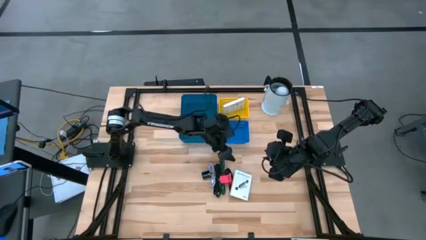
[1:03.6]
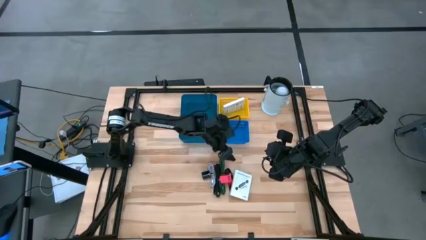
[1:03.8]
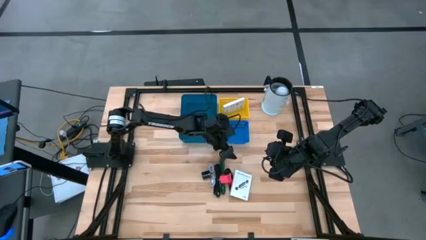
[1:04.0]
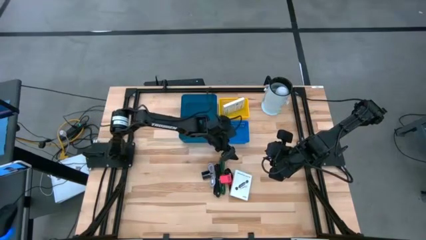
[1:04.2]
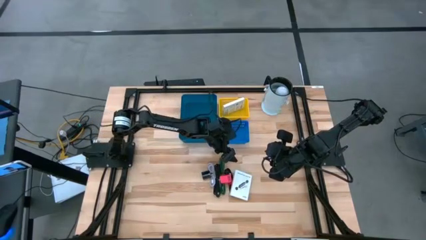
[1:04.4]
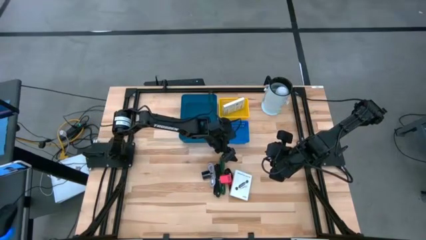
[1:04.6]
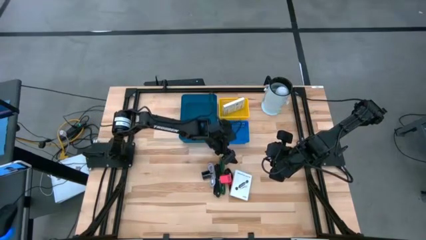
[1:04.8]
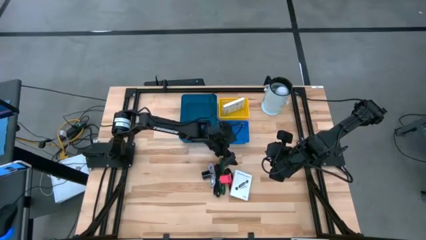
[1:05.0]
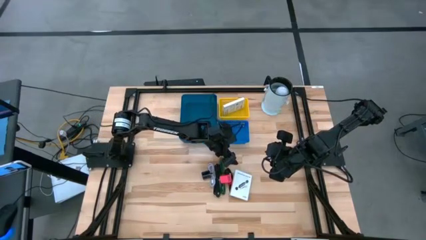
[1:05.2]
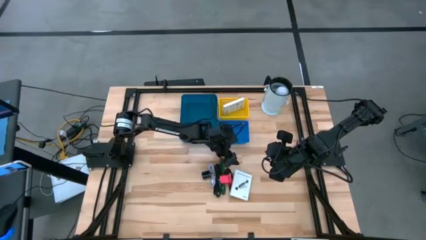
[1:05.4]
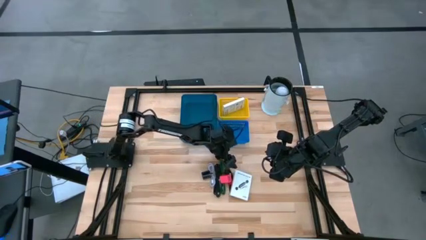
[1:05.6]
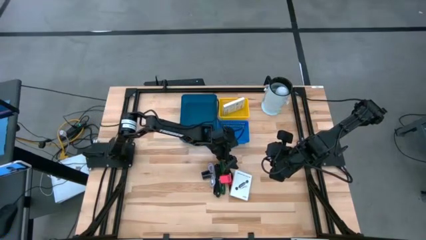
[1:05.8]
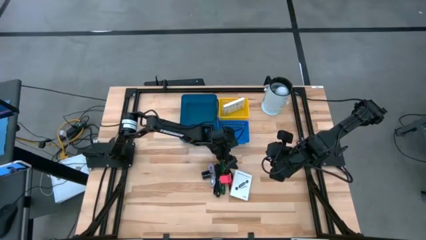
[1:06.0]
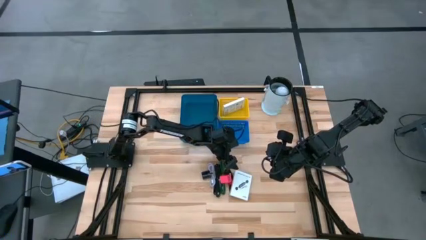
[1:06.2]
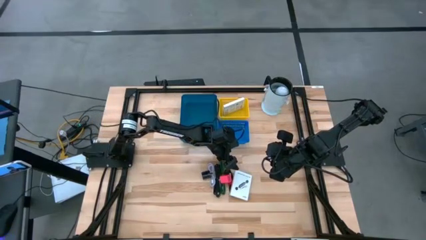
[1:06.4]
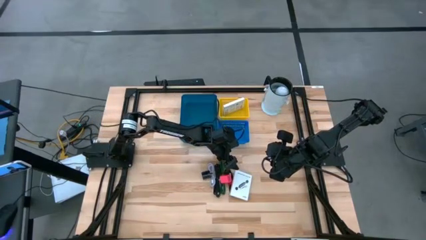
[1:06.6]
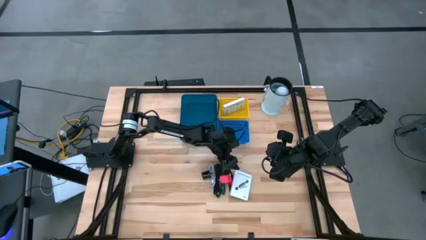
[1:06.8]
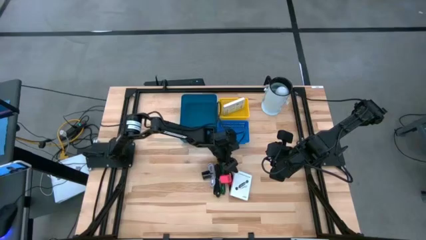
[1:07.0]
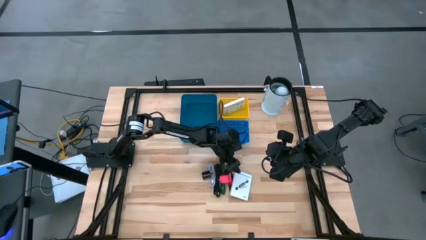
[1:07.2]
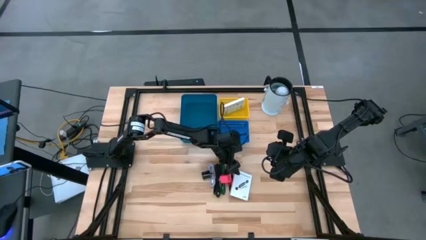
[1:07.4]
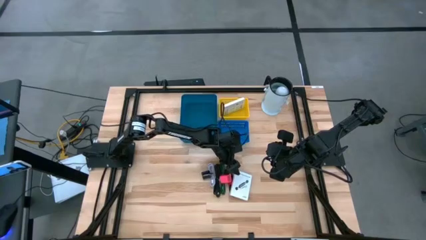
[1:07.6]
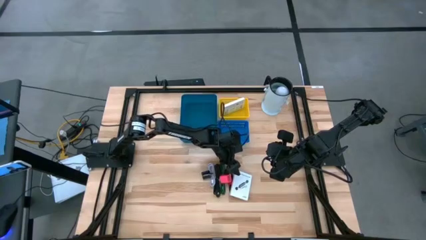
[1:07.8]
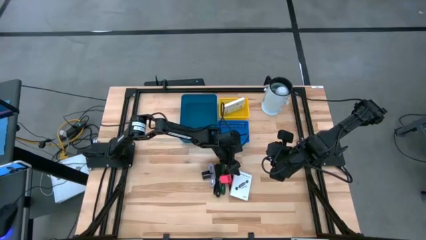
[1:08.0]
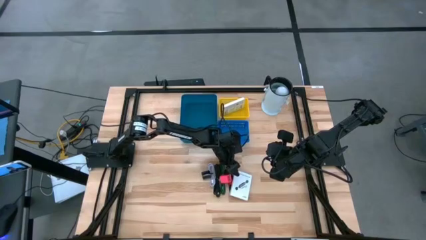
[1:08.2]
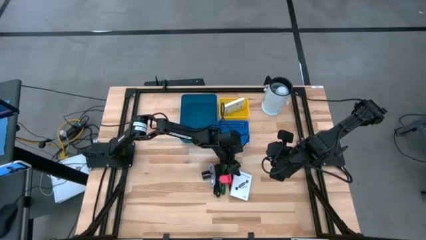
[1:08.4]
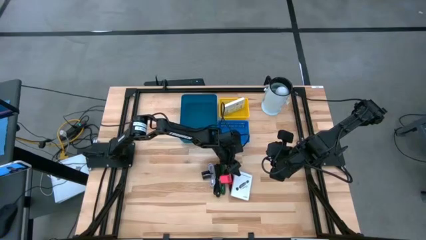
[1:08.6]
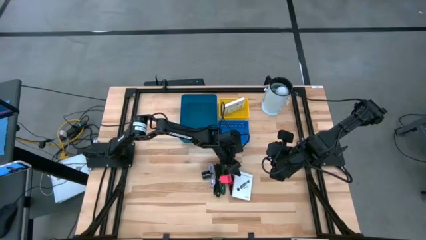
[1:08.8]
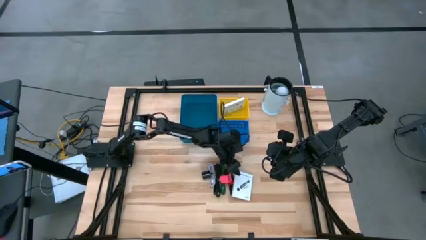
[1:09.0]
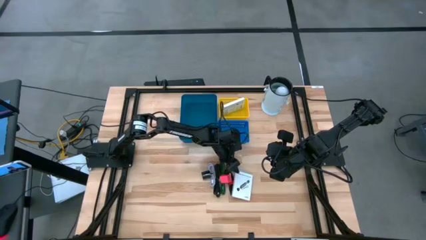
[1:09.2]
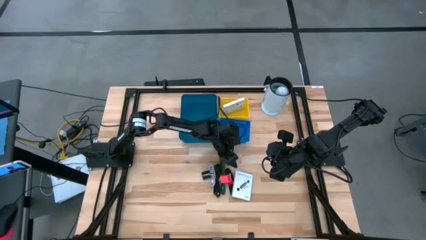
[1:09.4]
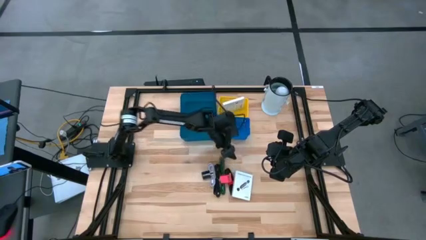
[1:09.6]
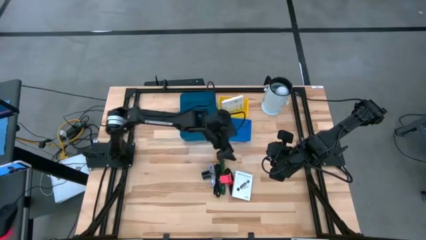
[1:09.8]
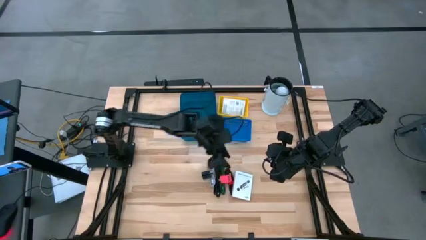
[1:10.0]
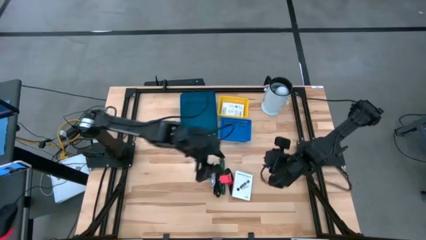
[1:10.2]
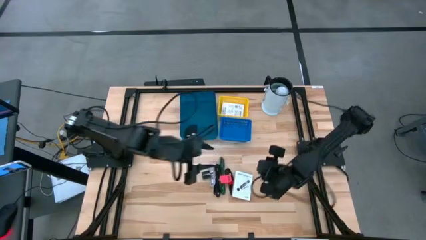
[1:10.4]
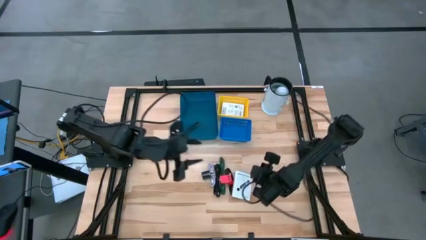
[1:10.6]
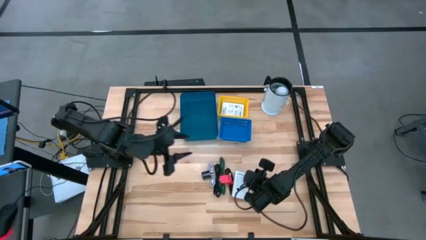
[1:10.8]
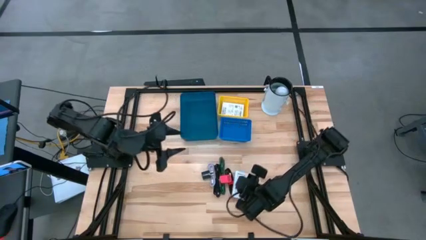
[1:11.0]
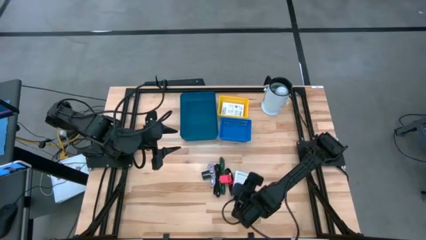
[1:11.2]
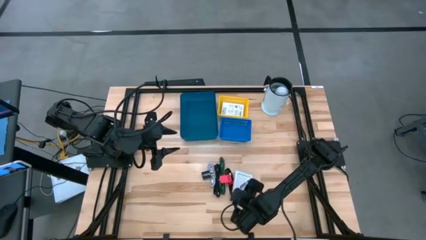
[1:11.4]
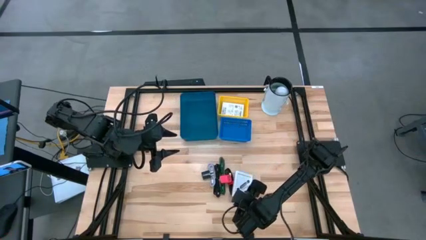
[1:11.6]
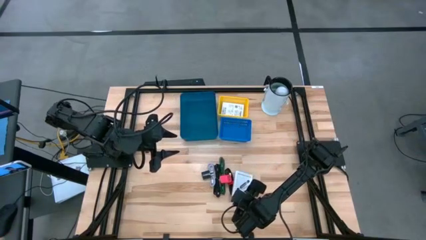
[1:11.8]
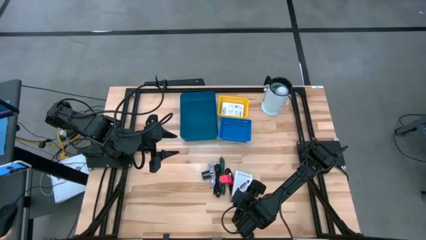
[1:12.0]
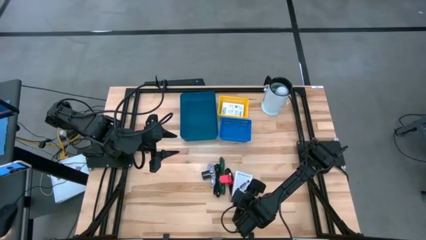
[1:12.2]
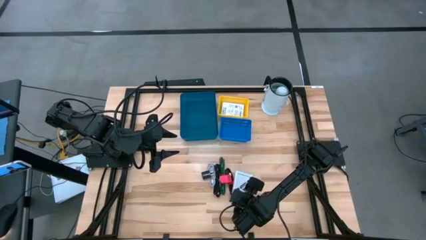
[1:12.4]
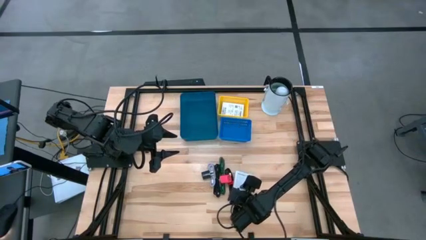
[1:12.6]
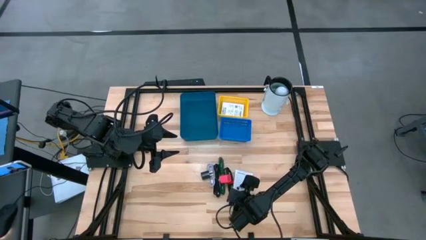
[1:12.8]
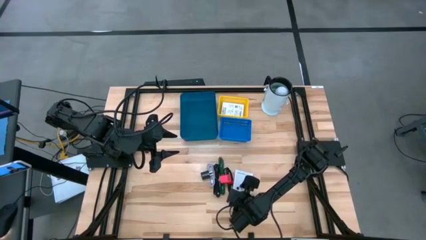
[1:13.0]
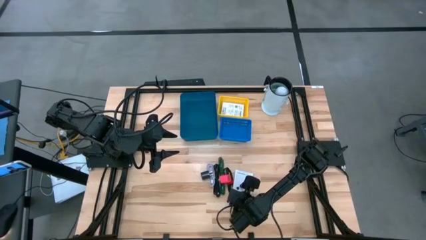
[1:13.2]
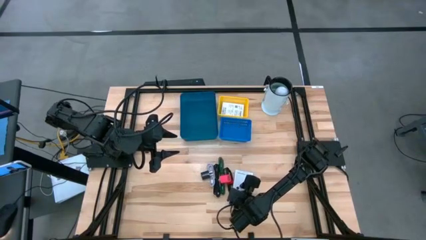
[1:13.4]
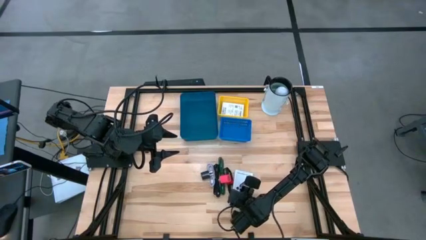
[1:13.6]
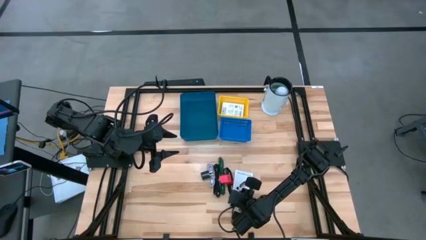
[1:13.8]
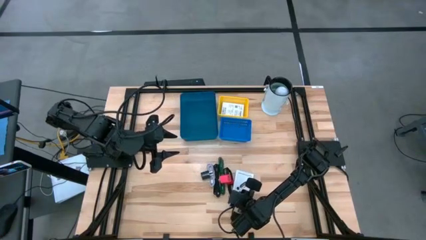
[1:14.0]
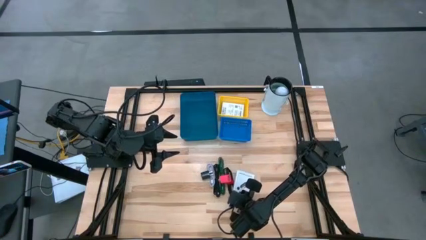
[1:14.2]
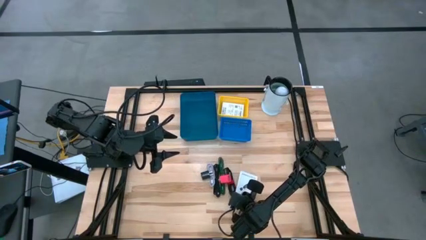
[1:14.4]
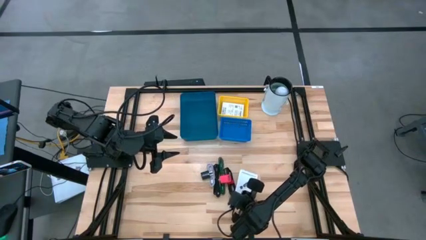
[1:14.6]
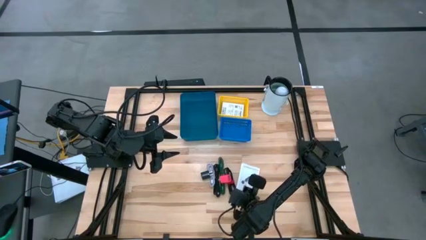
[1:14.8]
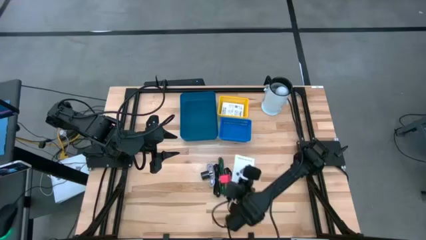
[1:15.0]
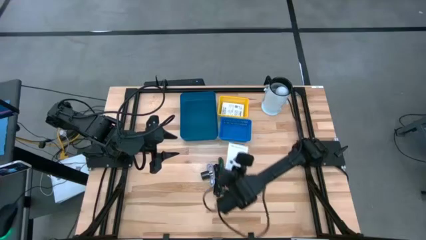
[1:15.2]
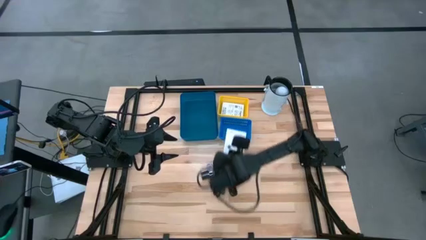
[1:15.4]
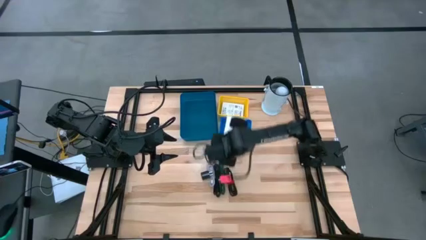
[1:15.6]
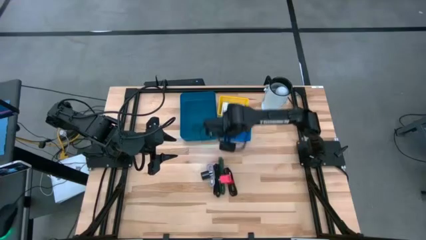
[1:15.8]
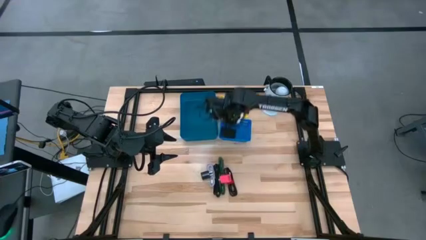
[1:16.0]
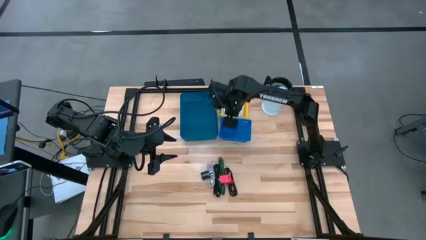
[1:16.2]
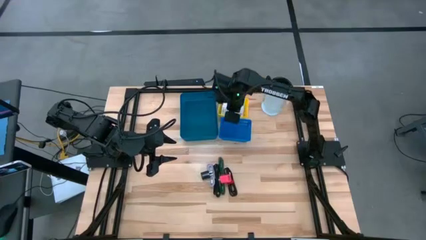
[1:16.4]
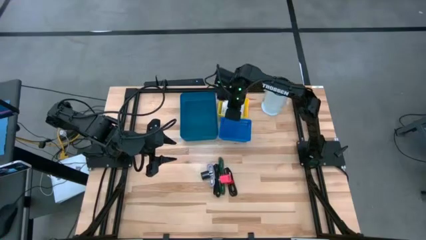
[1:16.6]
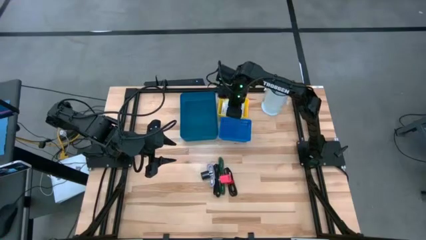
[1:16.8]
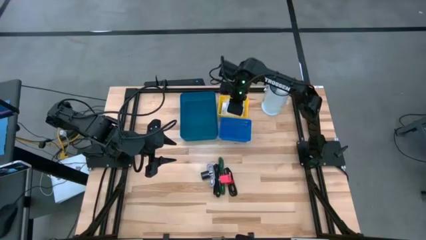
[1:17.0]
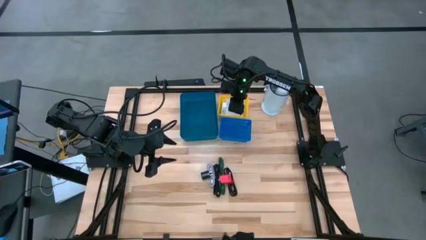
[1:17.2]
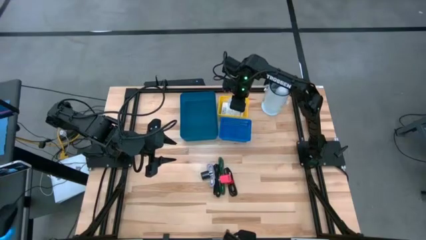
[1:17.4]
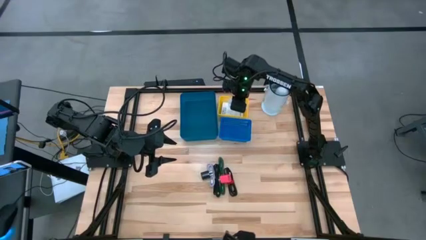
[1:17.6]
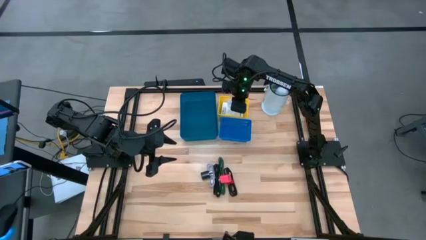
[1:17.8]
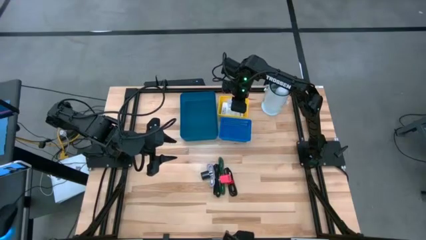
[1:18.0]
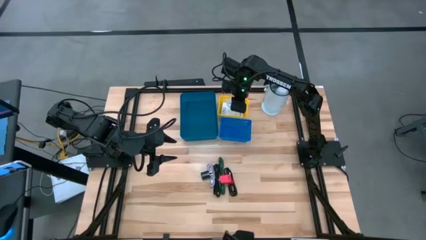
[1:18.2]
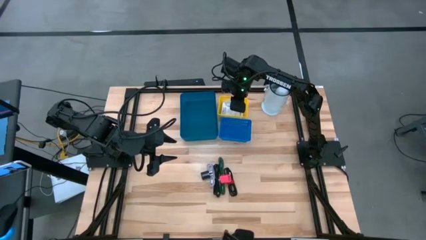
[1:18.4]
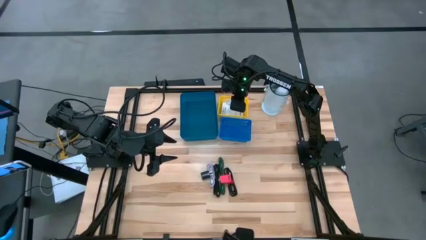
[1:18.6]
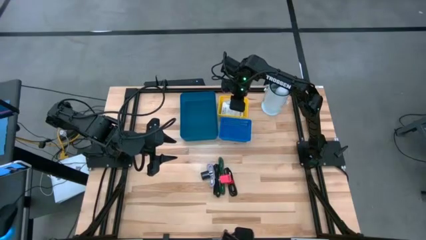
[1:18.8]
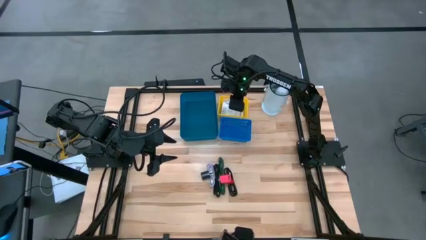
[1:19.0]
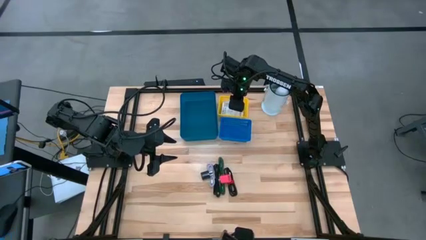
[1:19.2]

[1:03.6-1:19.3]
Task: Pick and place items into bin
Put the card reader box into the yellow bin
